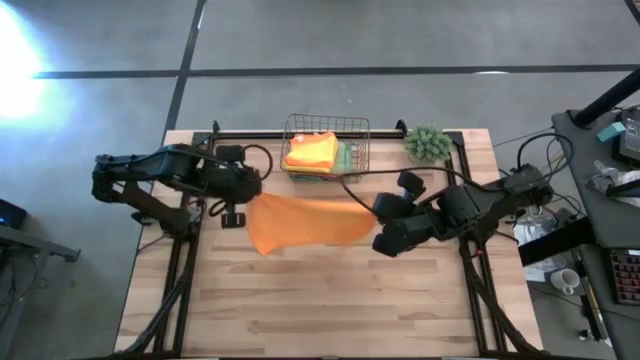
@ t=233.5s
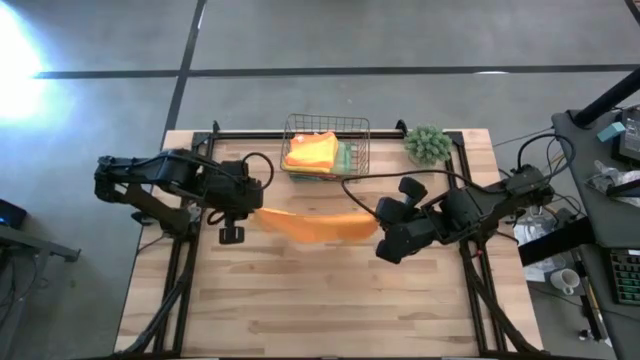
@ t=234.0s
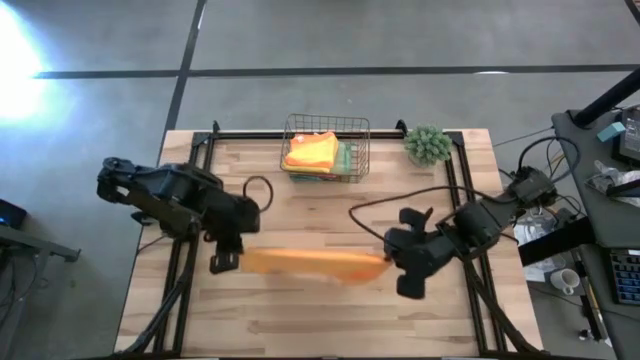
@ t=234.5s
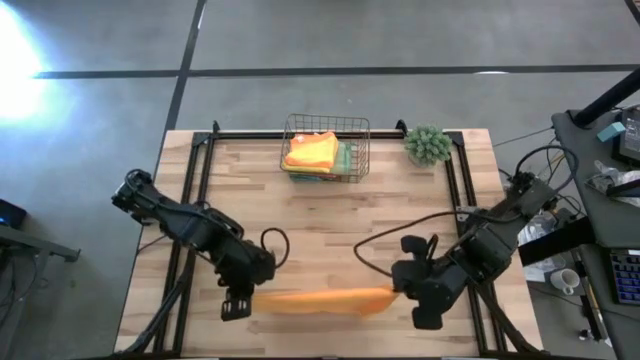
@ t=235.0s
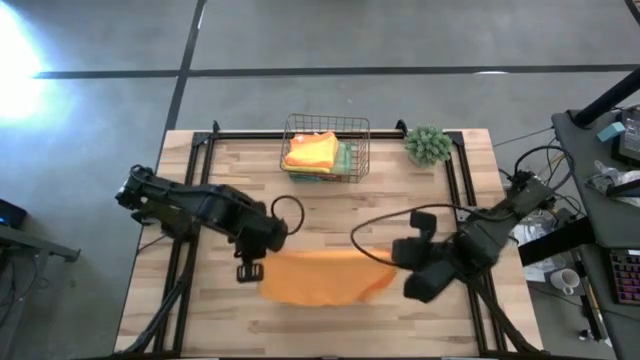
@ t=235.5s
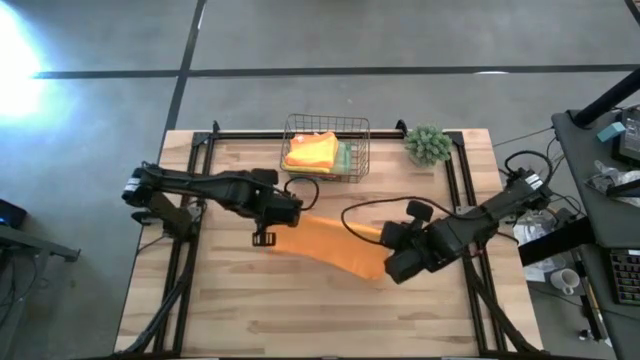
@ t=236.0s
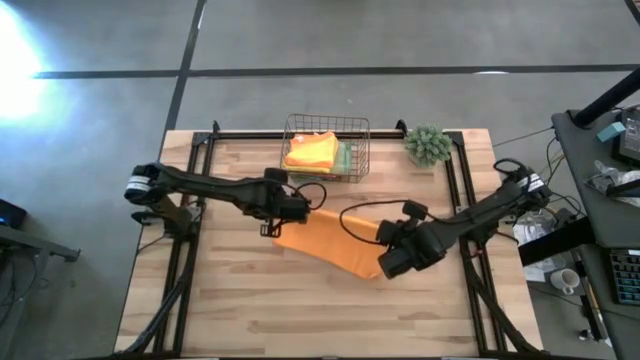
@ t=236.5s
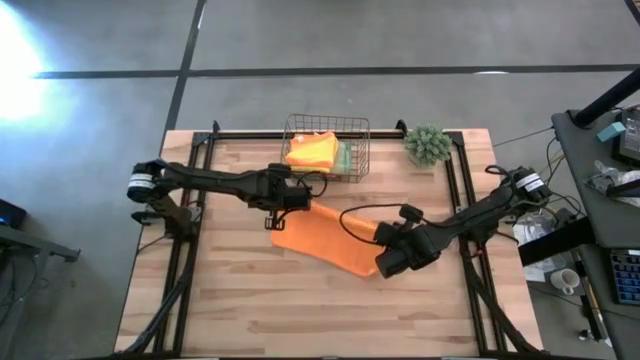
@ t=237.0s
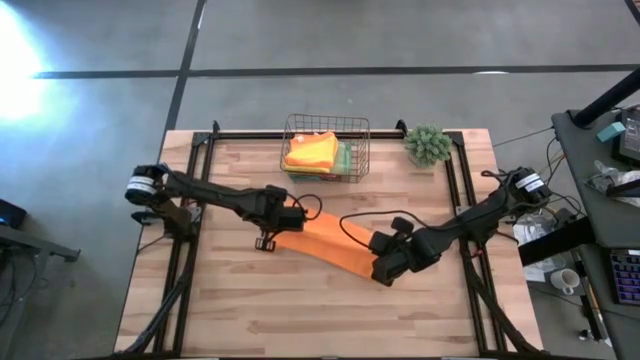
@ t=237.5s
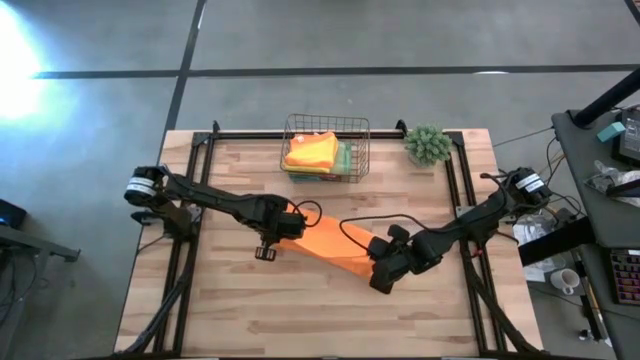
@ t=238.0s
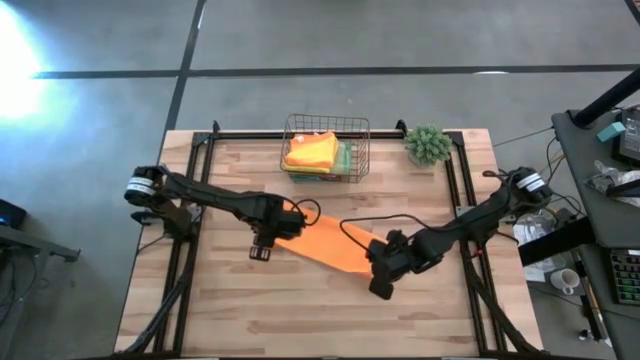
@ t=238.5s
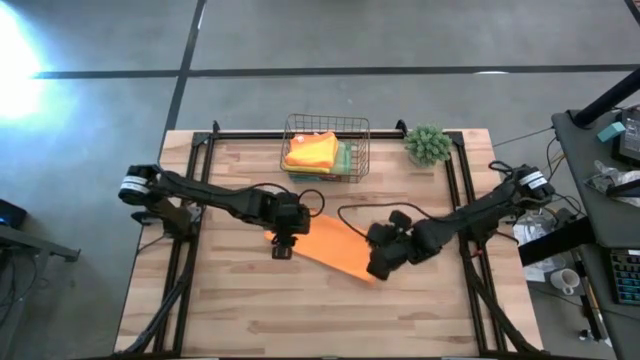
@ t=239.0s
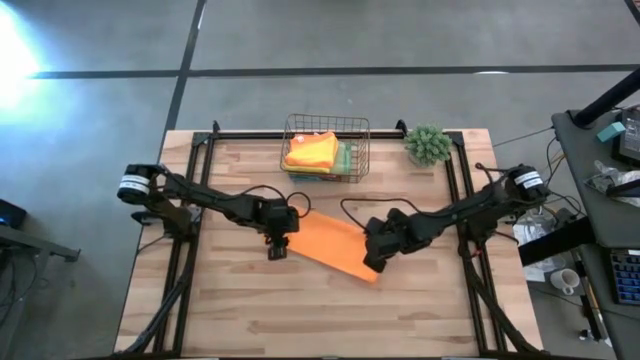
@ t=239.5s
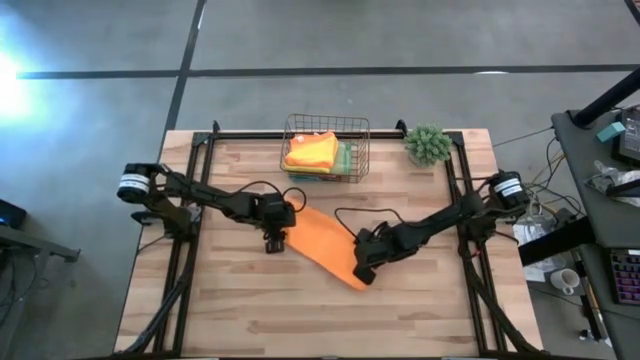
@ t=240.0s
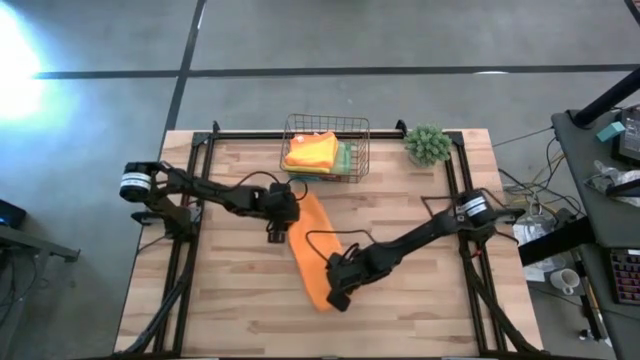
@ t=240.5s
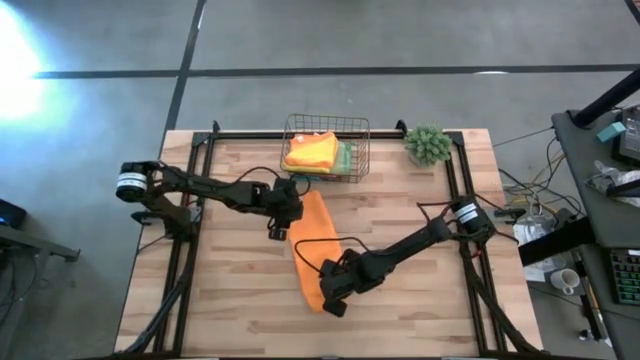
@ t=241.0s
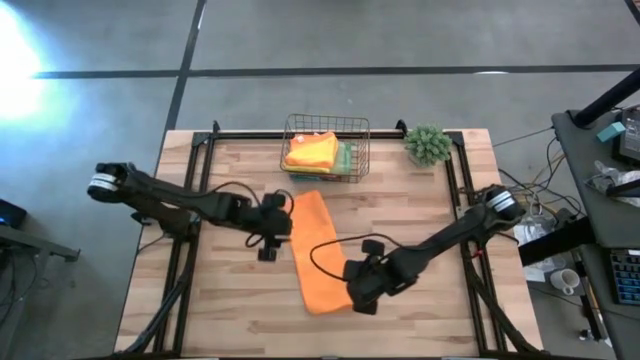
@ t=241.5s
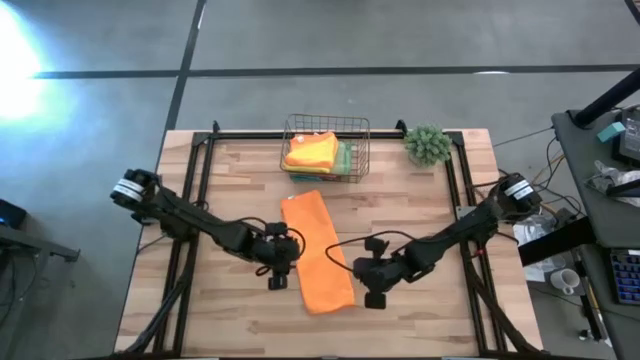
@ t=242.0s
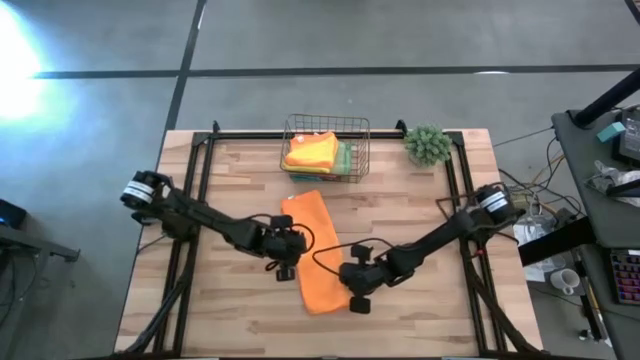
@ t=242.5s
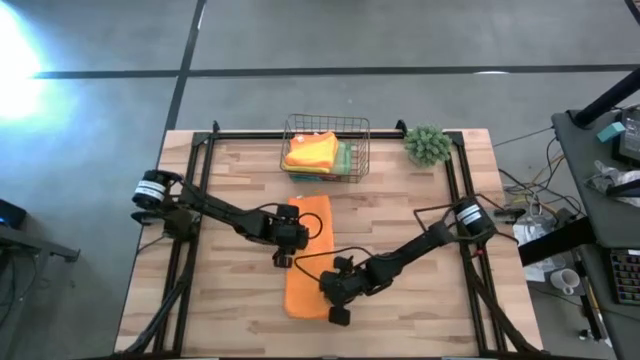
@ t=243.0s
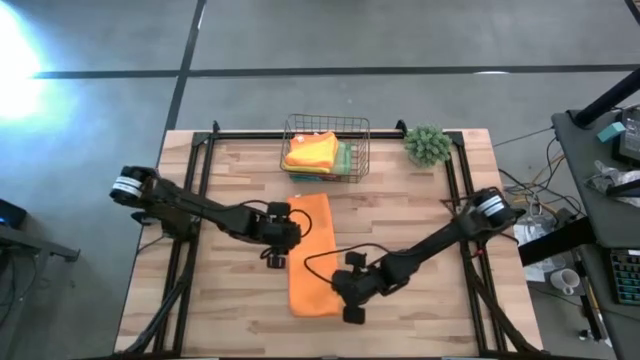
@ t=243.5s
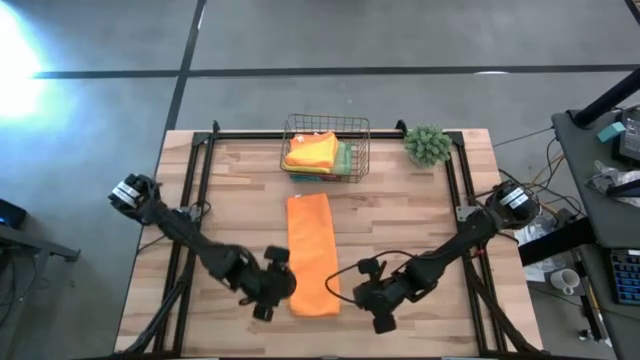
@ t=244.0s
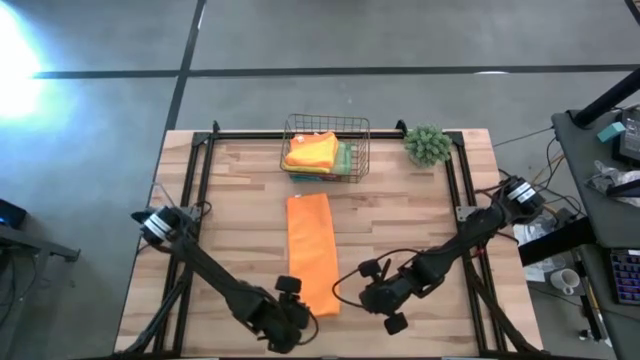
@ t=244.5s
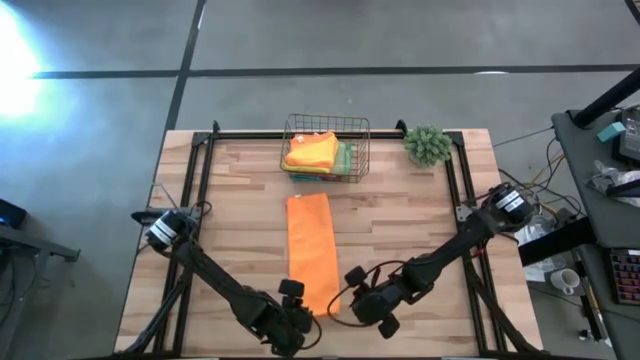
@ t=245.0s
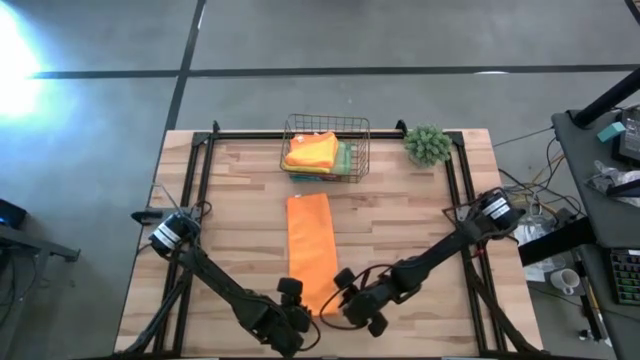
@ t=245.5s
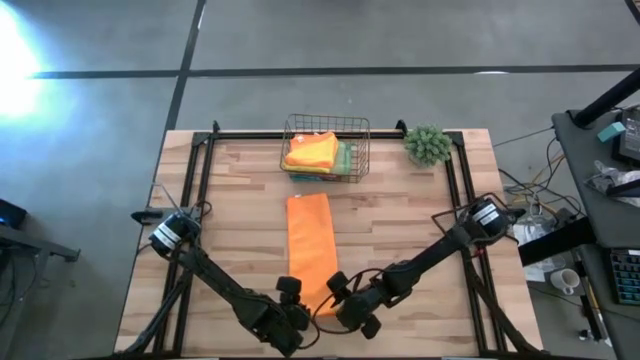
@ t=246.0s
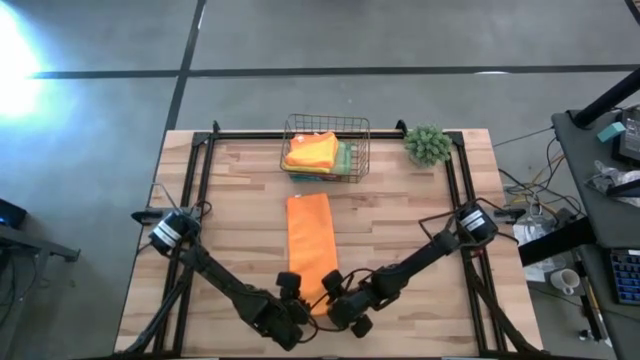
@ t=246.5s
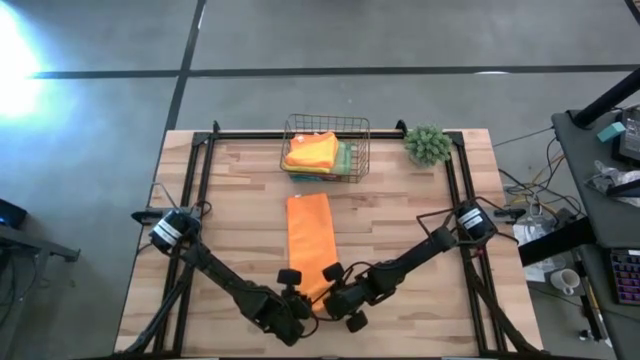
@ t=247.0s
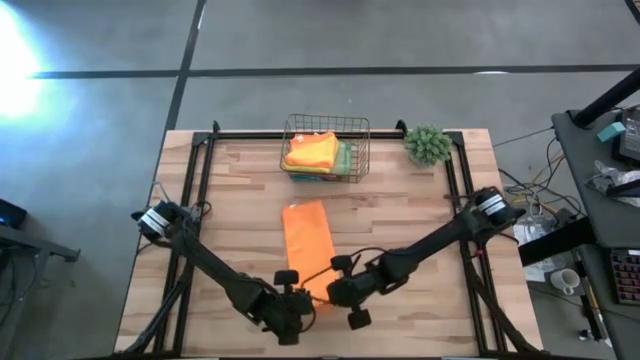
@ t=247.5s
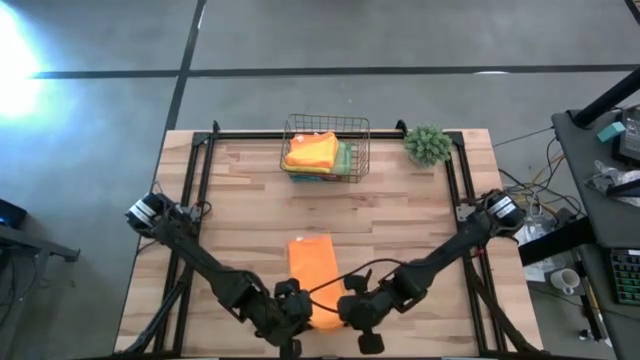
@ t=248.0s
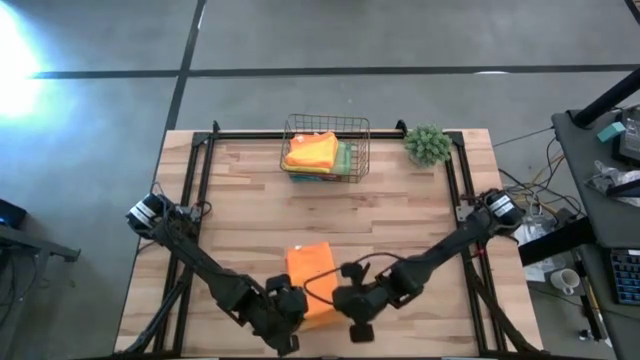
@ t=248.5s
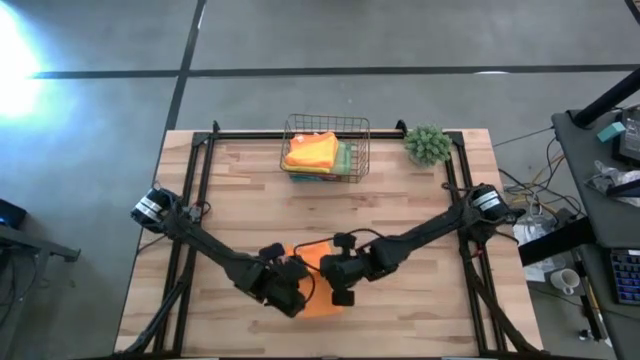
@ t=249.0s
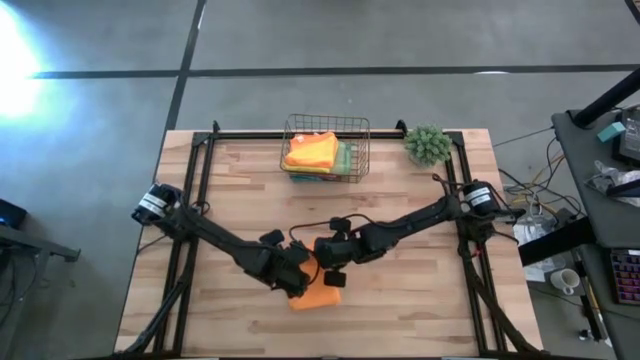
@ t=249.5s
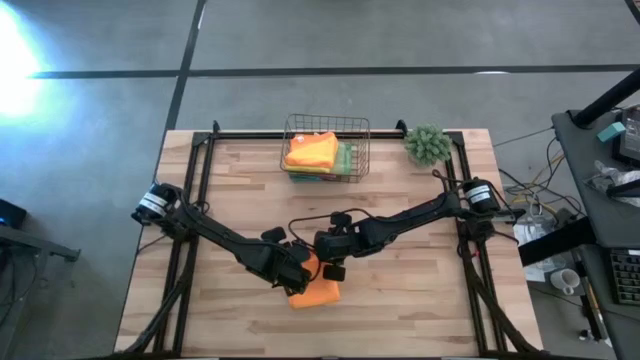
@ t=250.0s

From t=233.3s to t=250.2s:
Task: Fold microfiber towels
Fold the orange microfiber cloth

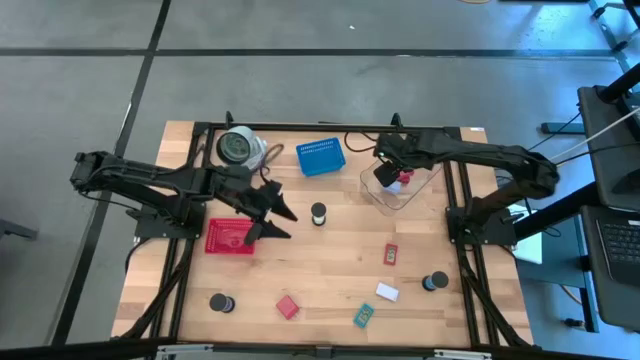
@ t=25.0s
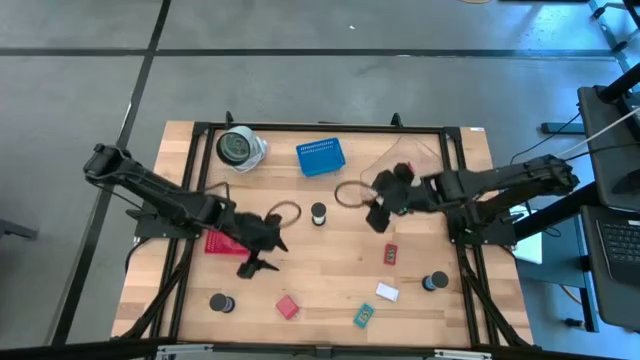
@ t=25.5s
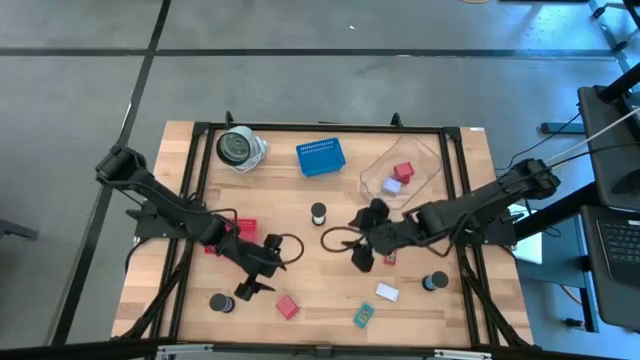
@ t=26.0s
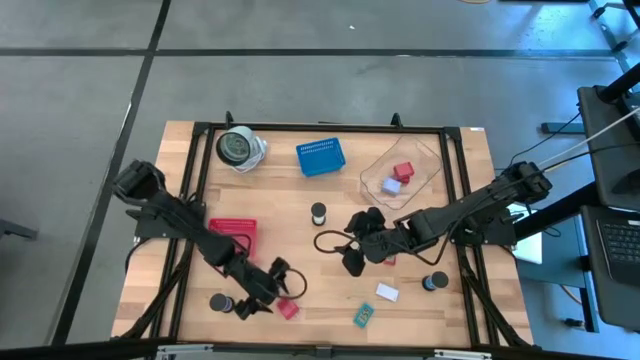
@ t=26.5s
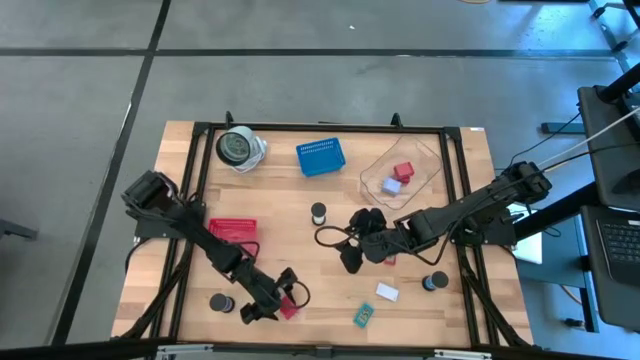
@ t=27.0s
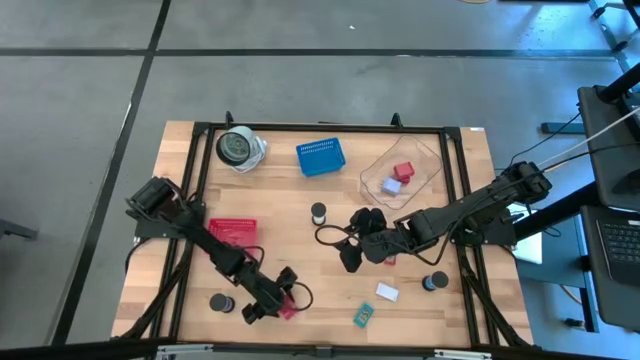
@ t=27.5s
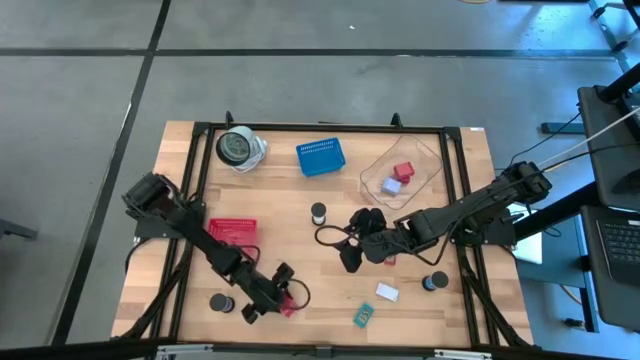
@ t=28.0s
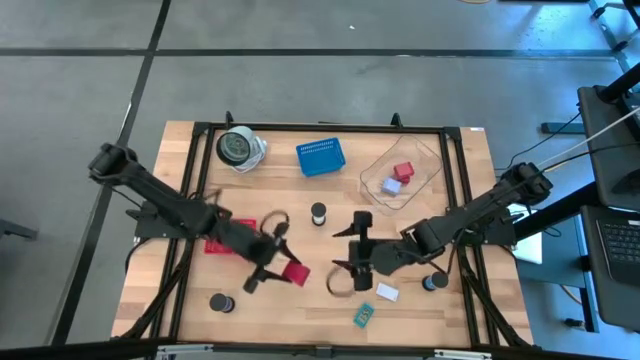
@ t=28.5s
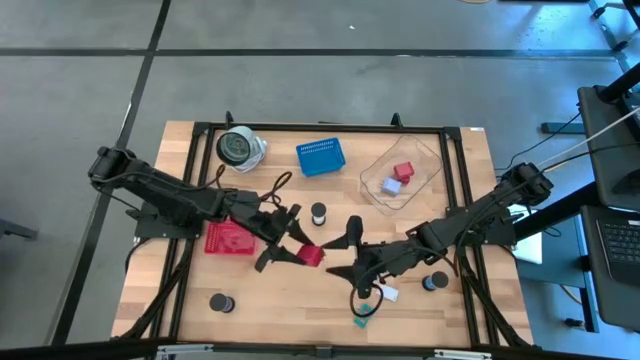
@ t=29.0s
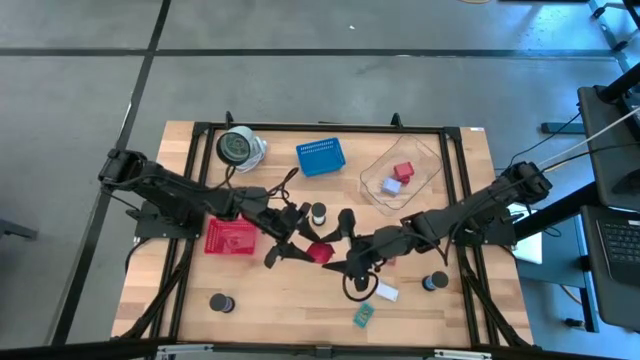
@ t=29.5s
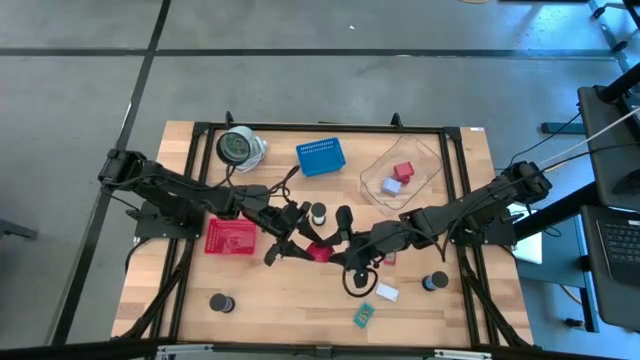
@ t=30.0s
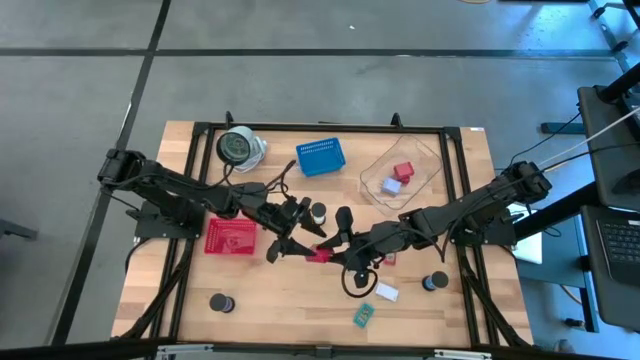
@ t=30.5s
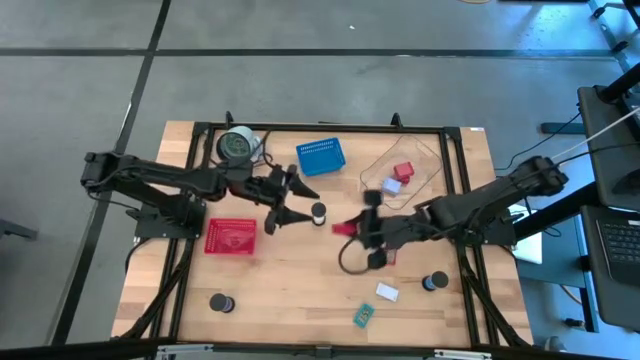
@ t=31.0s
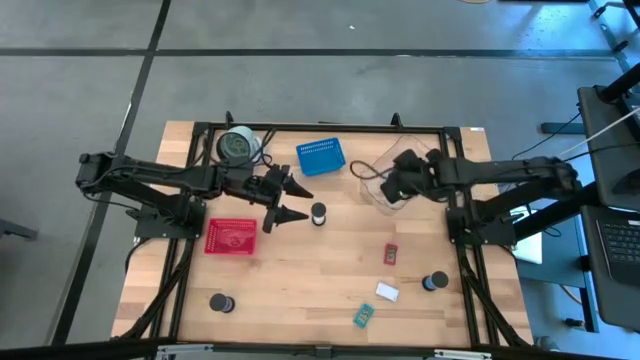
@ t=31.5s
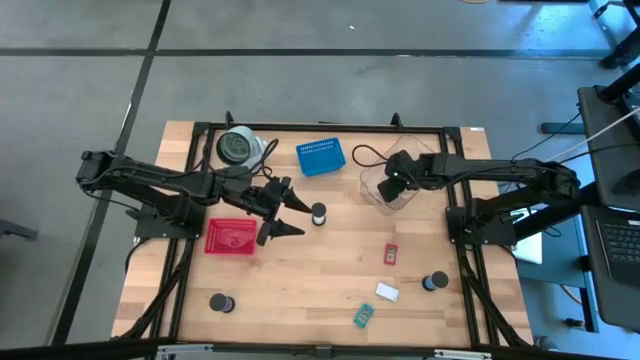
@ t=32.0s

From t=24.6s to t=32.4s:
Task: Pick & Place Office items
Put the red charger adapter into the transparent bin
